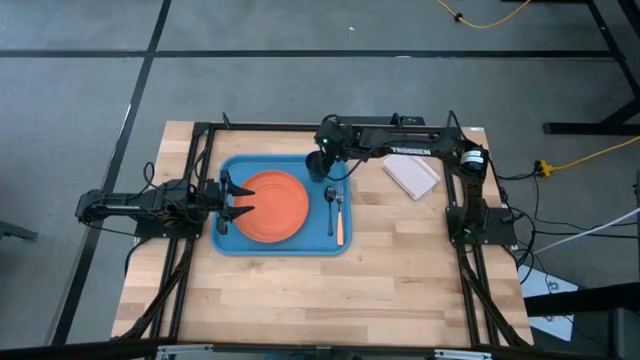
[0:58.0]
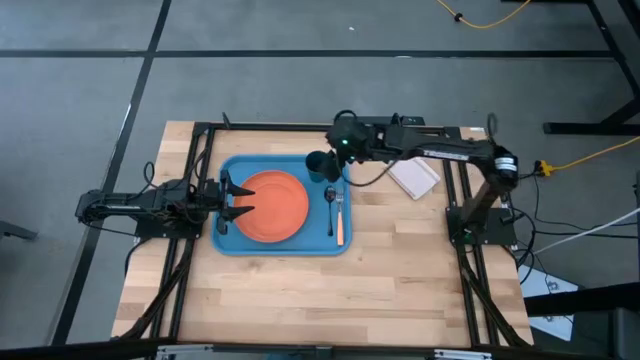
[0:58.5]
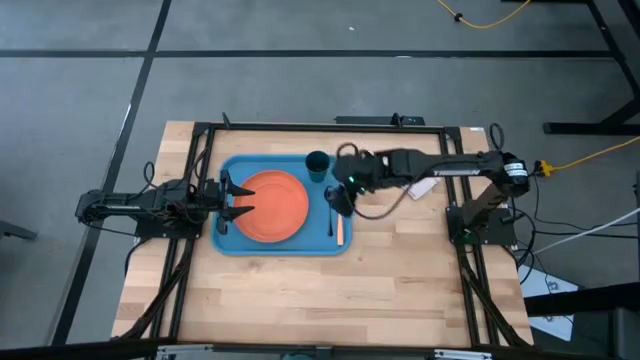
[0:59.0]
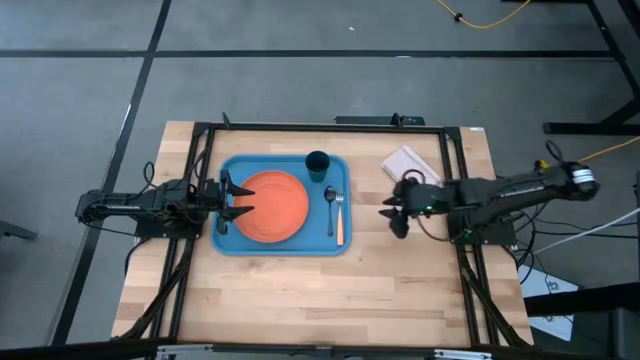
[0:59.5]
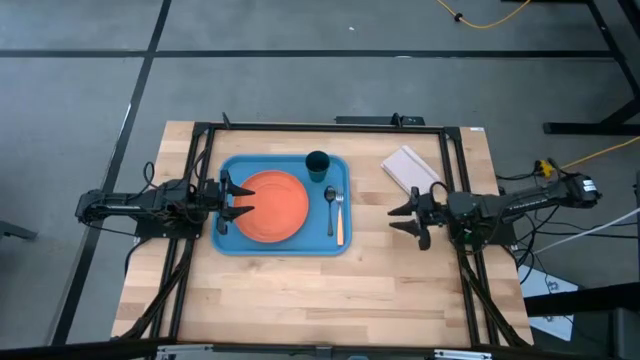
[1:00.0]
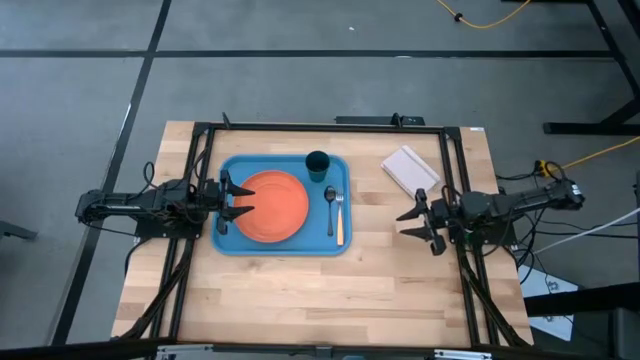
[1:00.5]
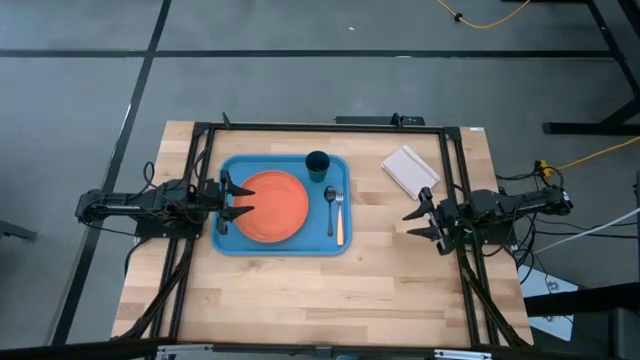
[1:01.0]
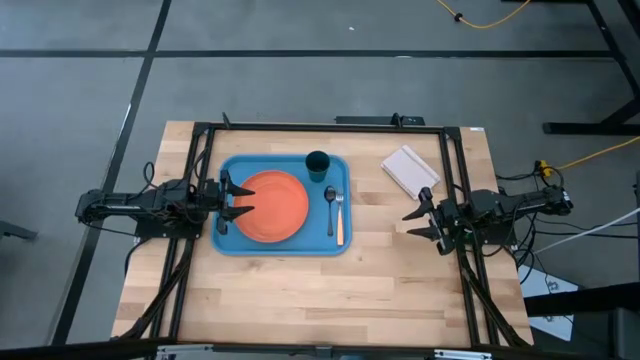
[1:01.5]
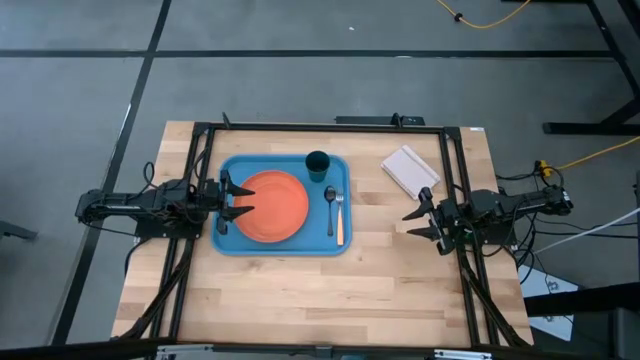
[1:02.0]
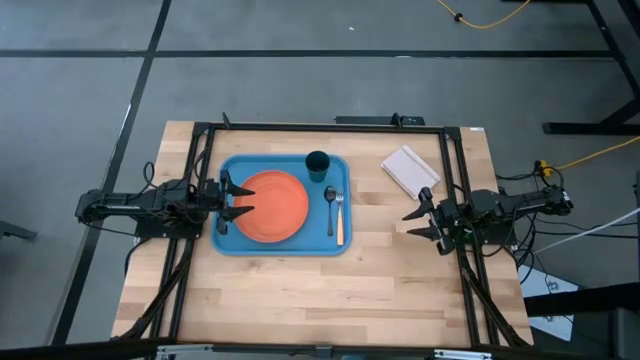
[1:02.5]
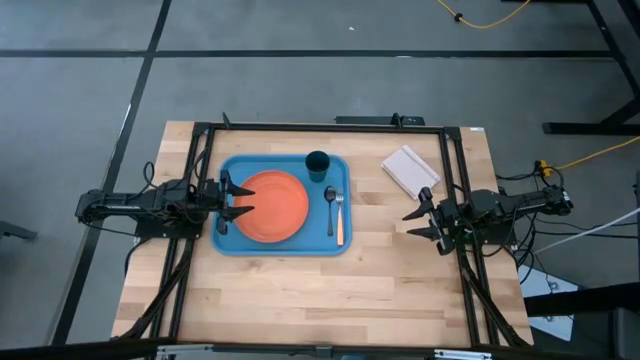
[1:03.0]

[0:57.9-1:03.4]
Task: Pick and place plate/cup/fork/spoon on tray
Return to Home Position

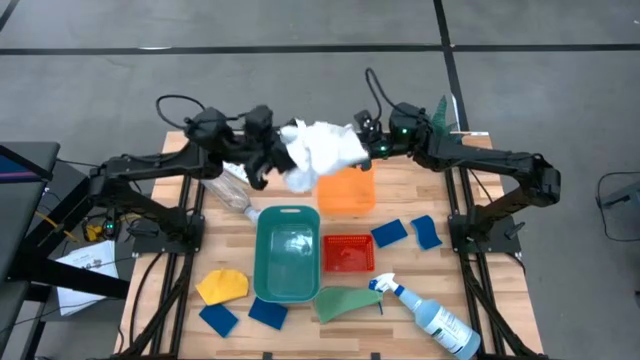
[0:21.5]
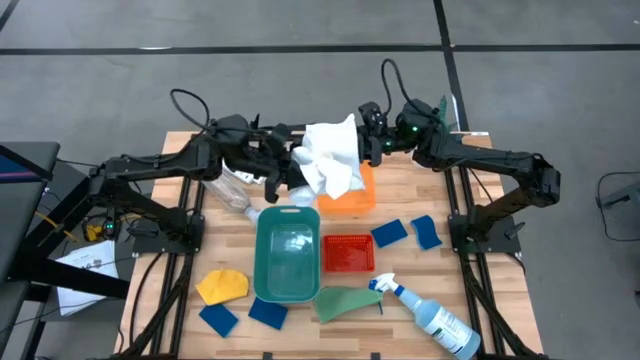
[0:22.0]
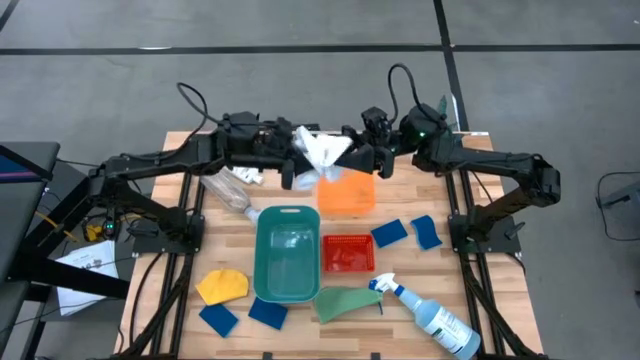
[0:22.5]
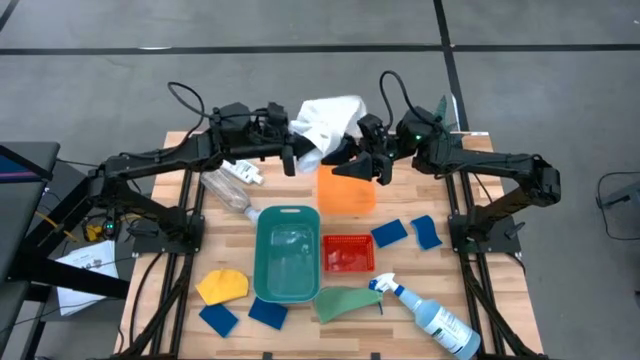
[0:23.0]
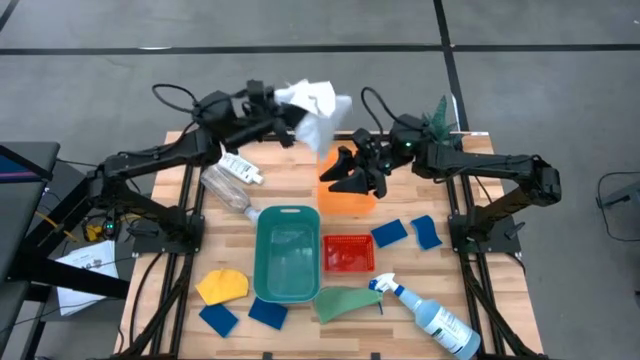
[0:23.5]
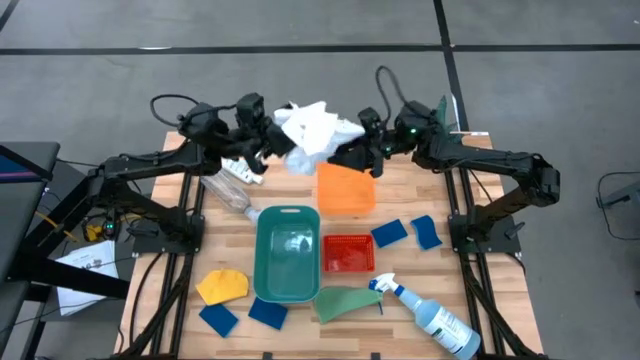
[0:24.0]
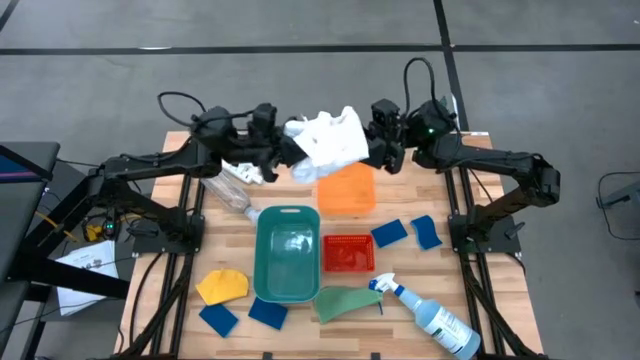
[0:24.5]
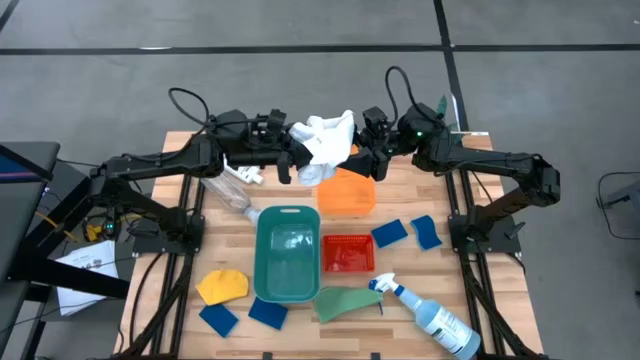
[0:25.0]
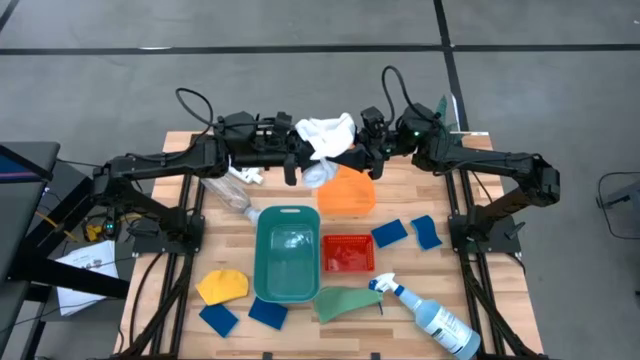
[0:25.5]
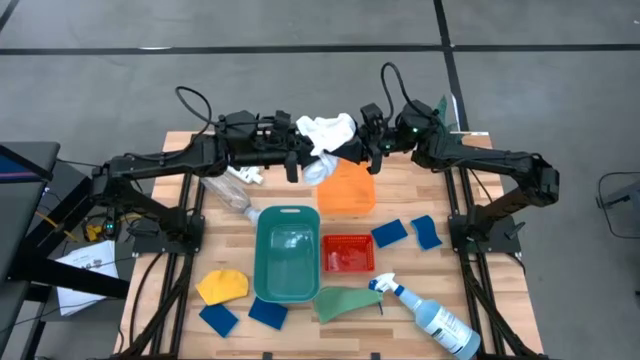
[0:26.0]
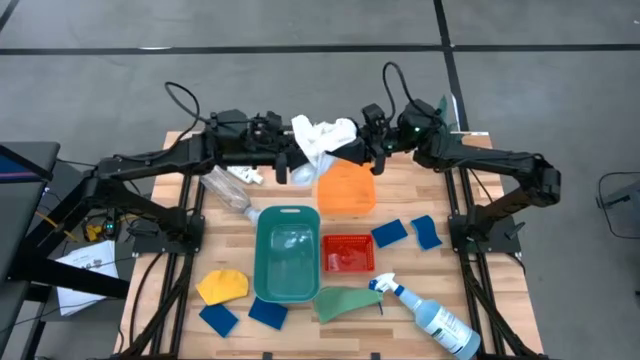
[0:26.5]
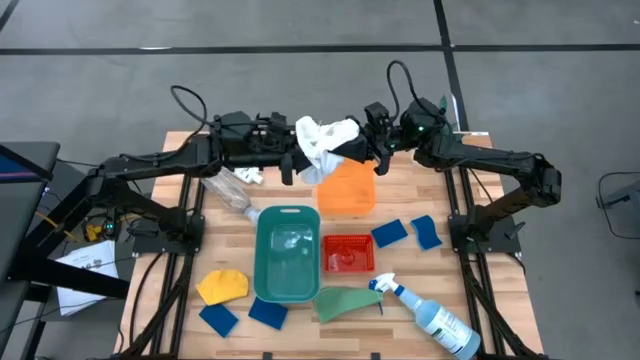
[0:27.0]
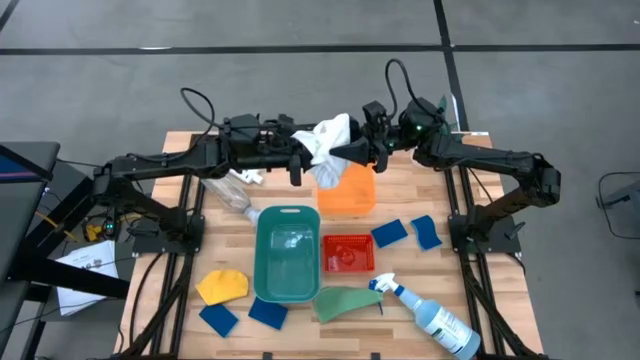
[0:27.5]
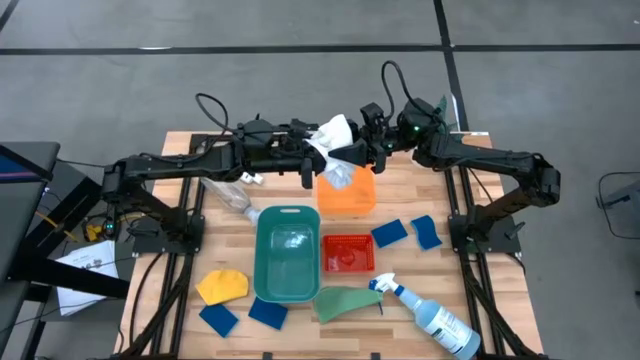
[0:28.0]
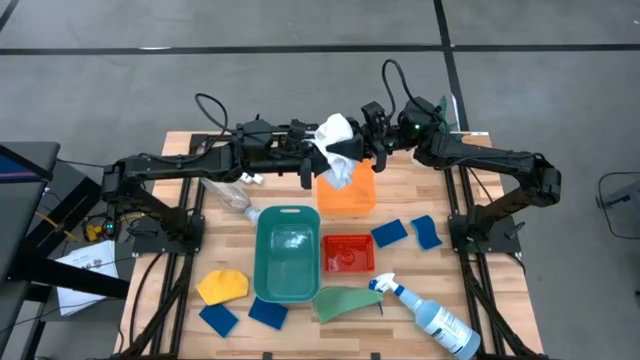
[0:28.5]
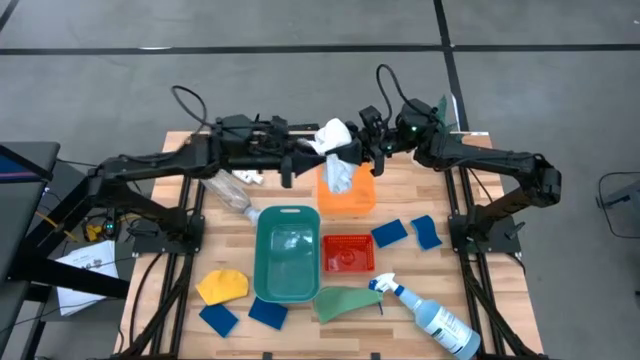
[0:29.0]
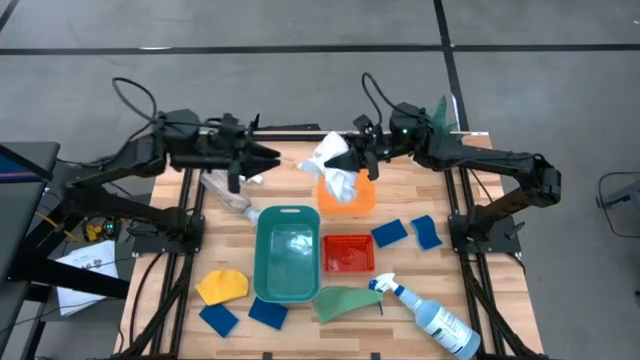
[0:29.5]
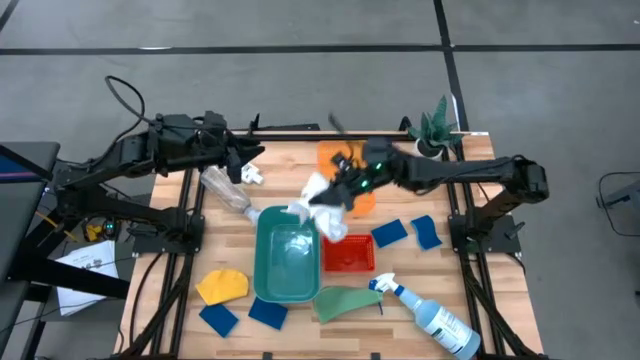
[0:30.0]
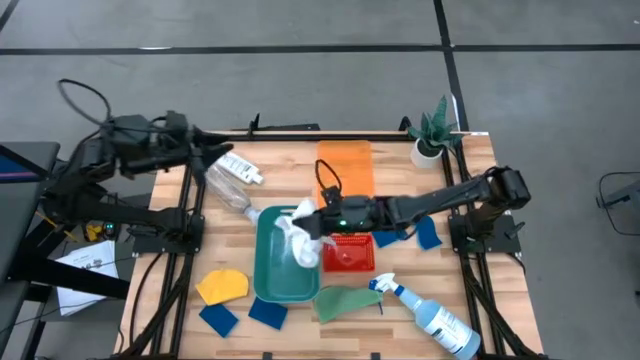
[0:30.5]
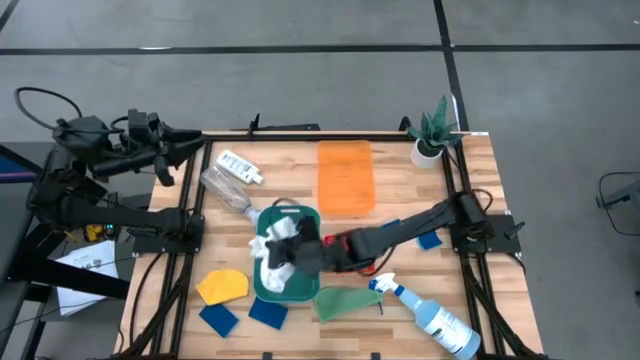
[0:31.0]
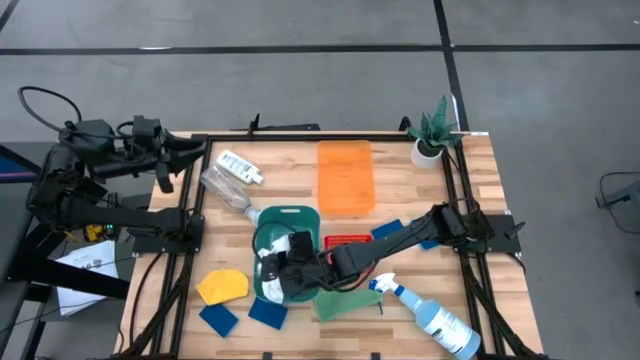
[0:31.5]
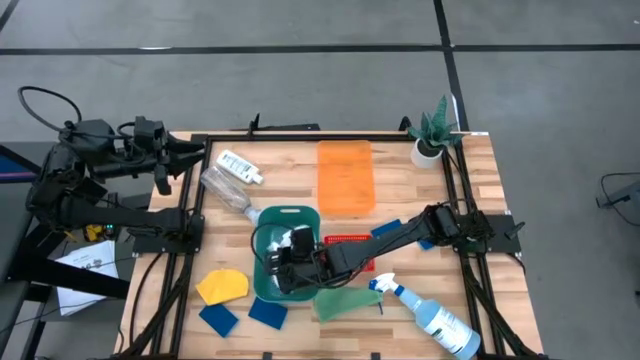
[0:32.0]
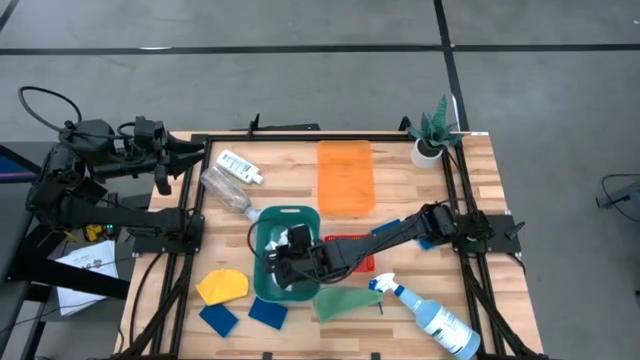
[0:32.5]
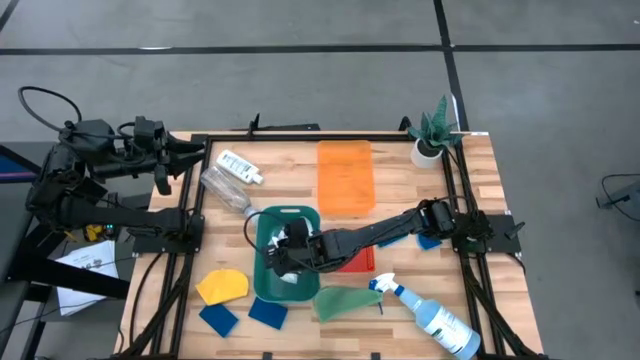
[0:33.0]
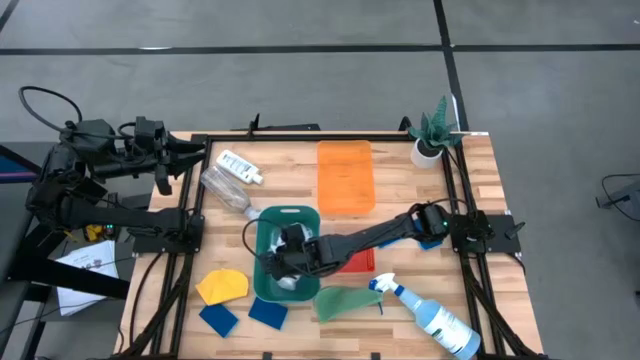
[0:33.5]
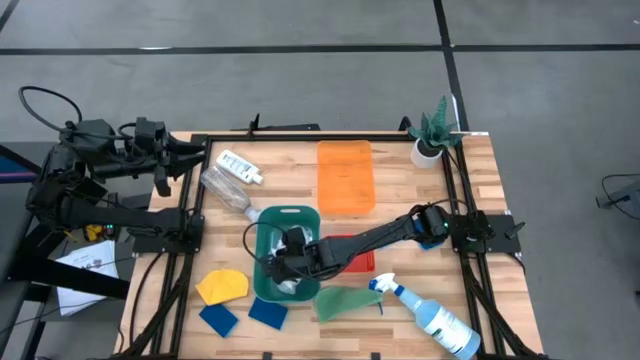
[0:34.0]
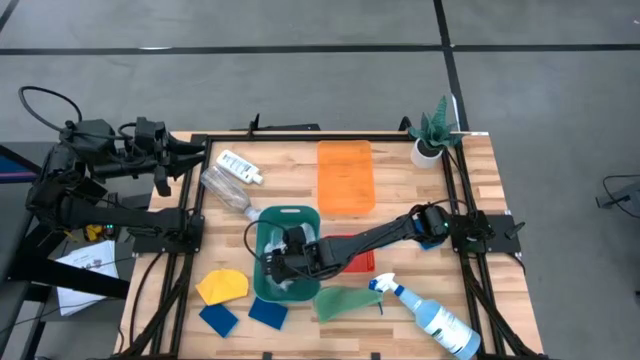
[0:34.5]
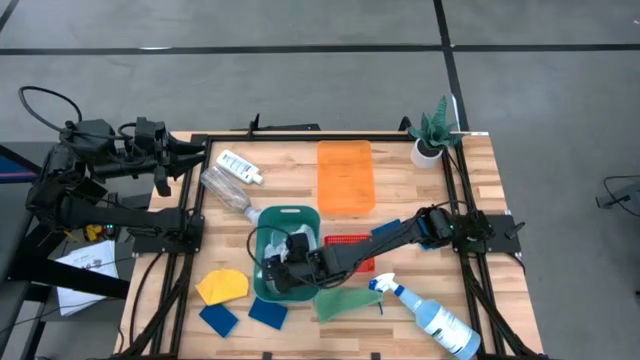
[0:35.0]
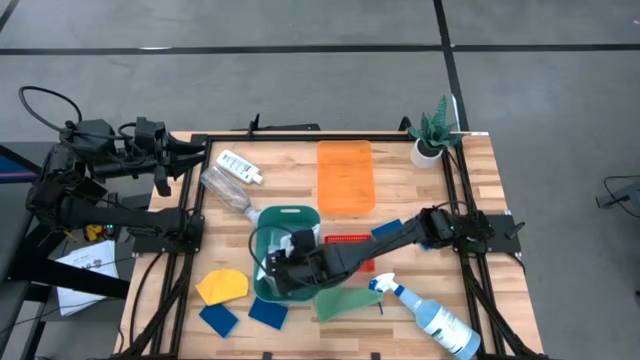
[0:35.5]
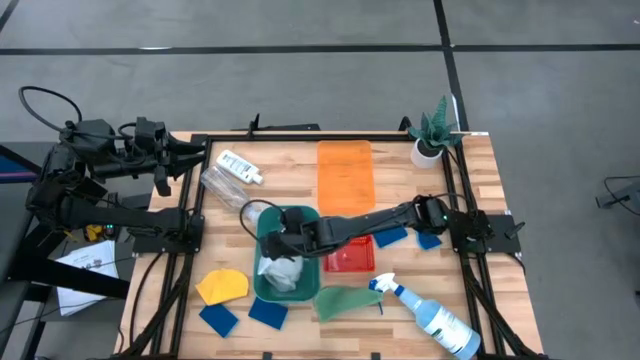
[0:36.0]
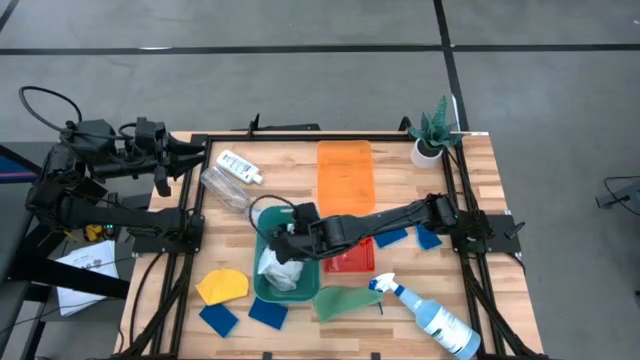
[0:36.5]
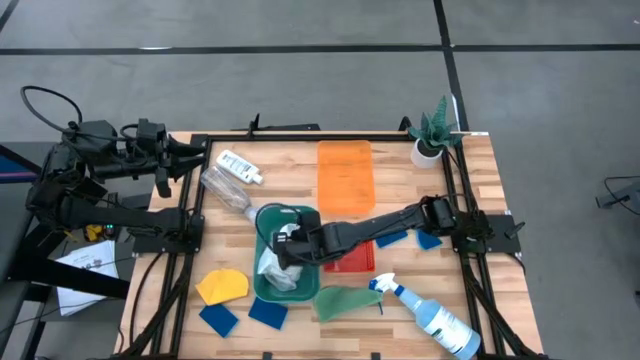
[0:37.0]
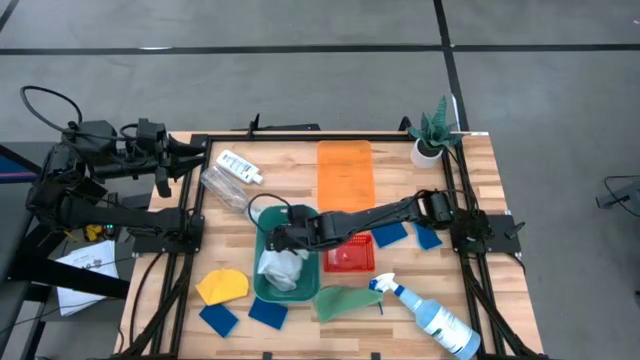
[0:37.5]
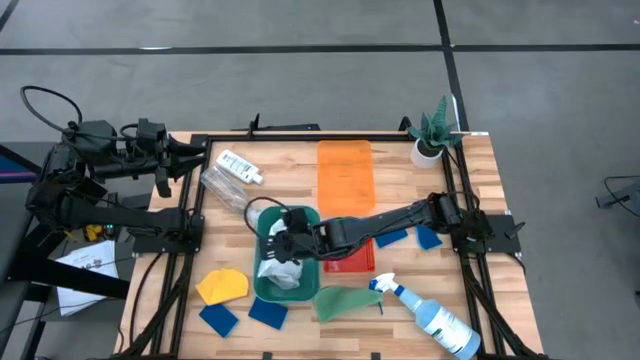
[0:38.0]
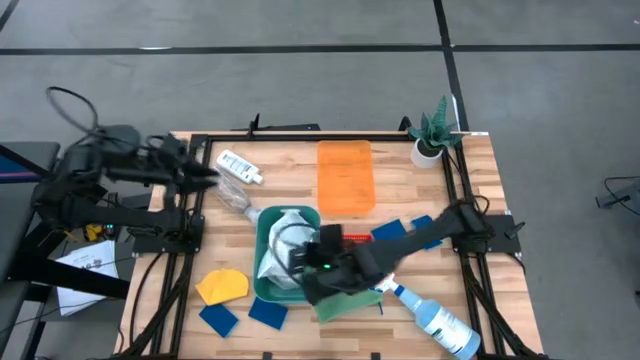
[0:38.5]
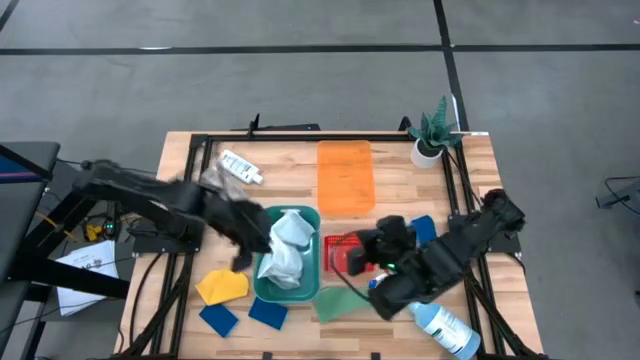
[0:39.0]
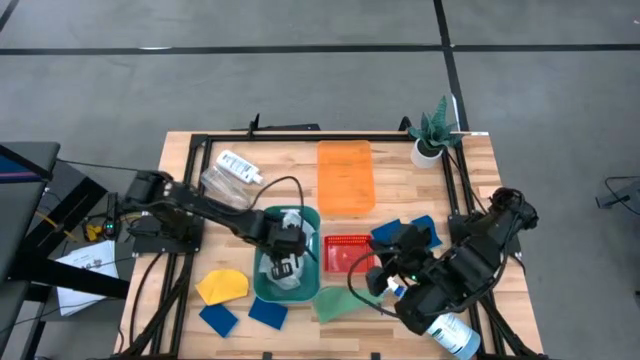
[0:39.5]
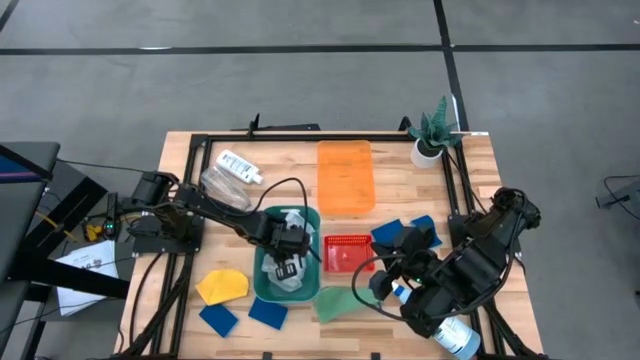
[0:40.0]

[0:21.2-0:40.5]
Task: Pick & Place Kitchen Items
Put the white towel into the green bin
